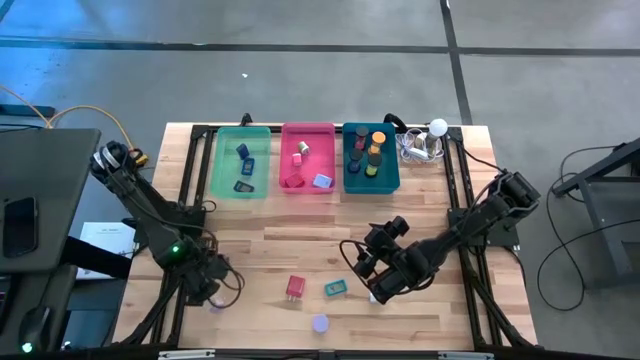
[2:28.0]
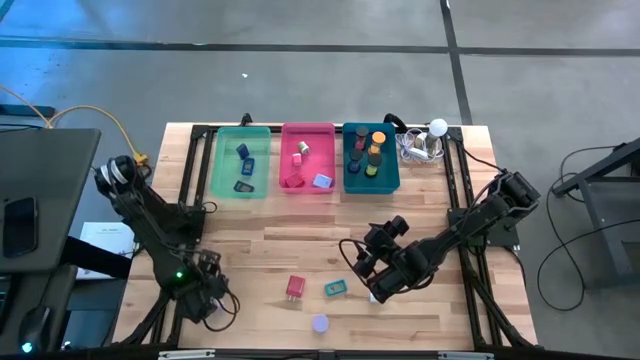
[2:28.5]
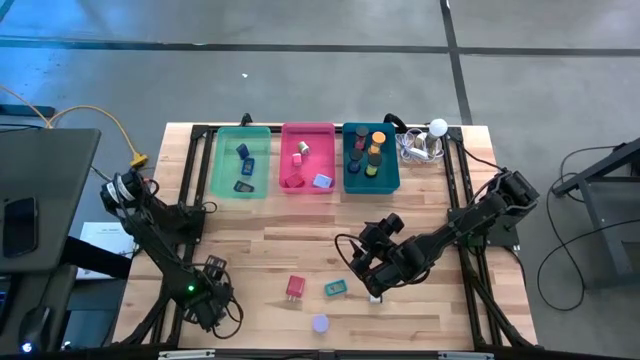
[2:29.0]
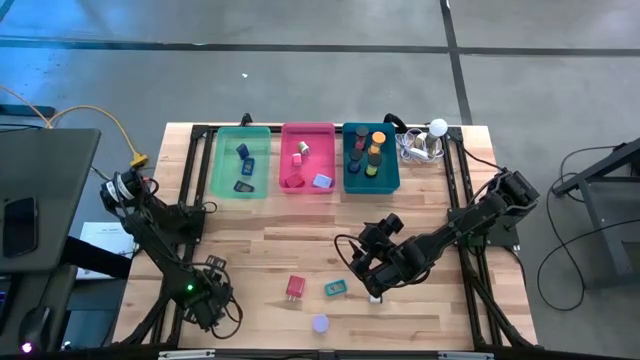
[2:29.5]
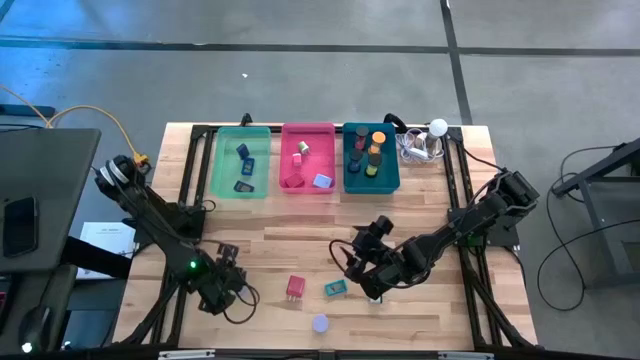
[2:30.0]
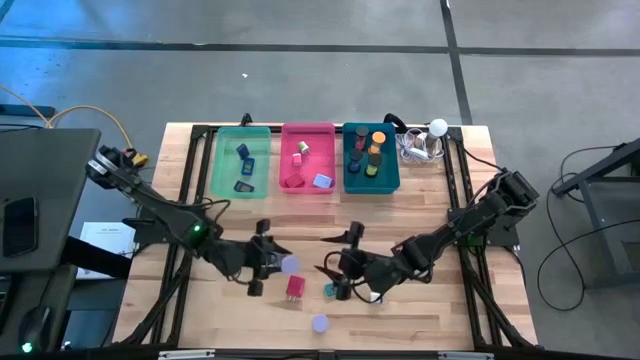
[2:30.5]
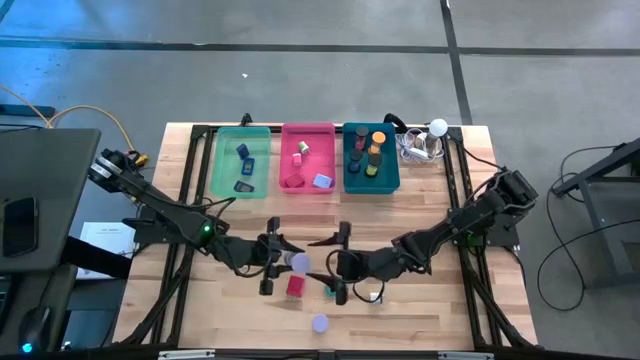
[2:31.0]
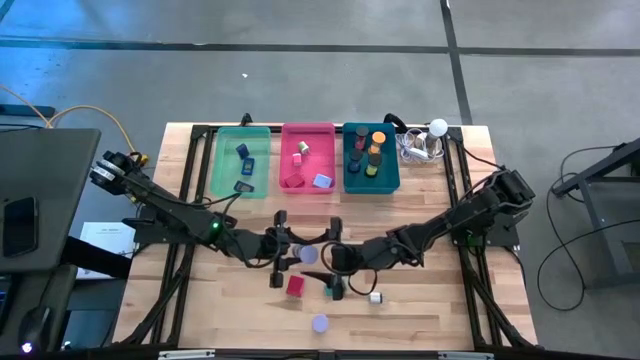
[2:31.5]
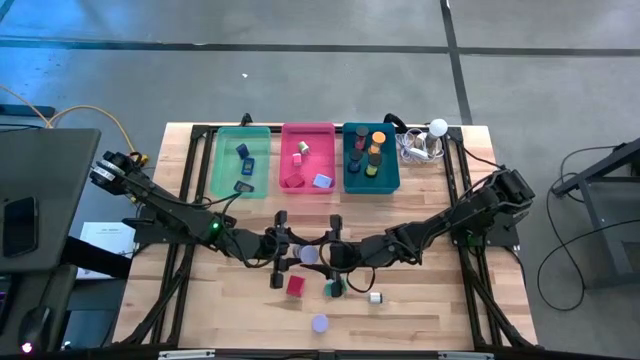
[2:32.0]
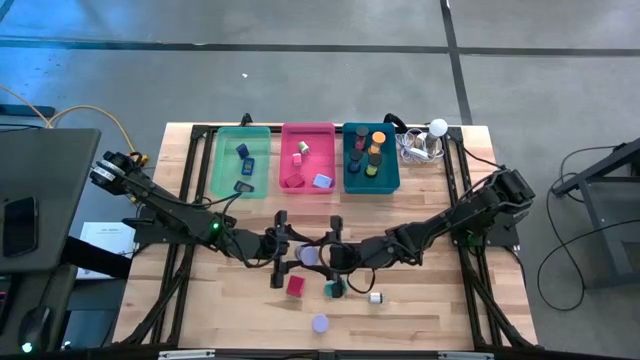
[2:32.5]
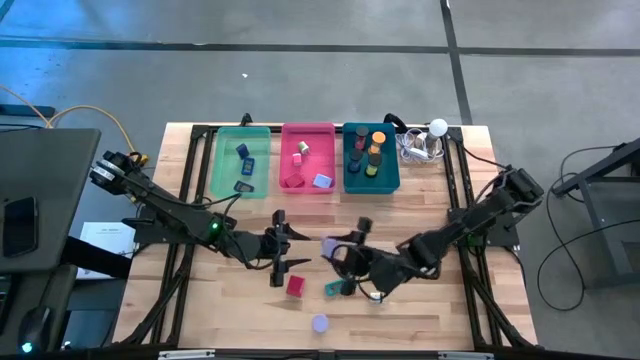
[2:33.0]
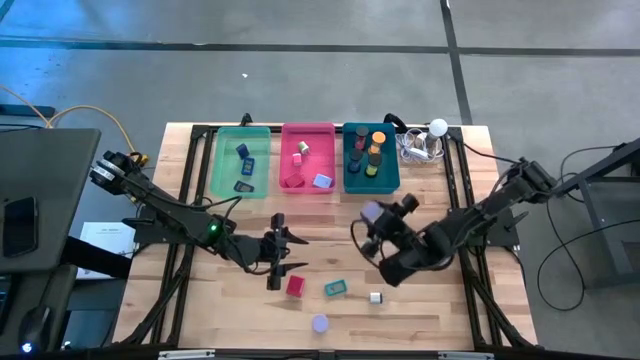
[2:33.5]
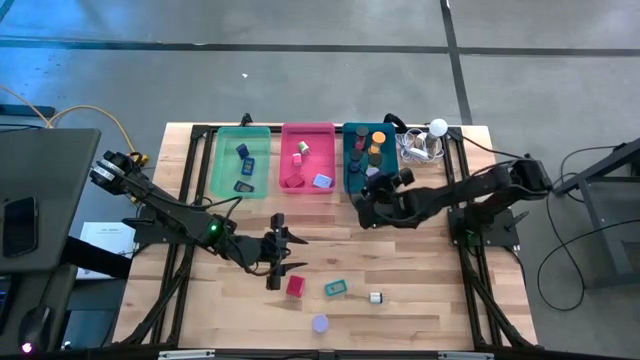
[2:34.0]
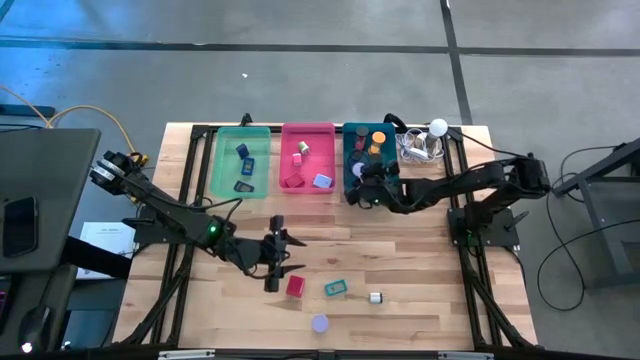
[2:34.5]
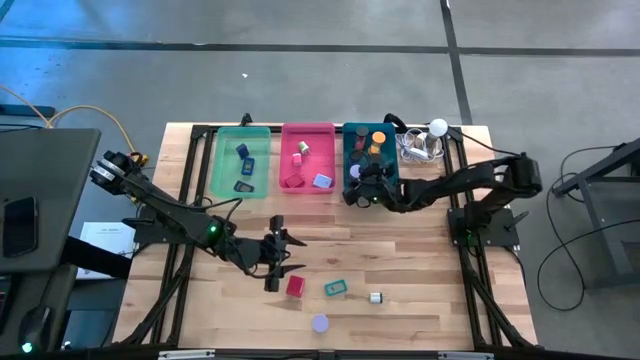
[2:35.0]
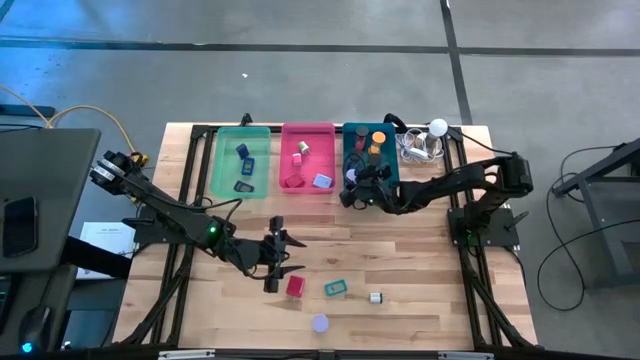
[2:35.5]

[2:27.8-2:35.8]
Task: Pick & Place Office items
Put the top purple hourglass into the blue bin

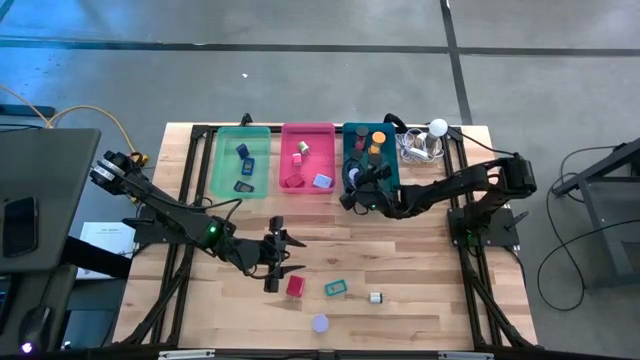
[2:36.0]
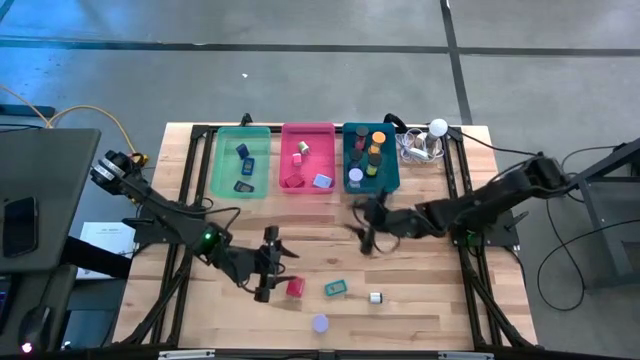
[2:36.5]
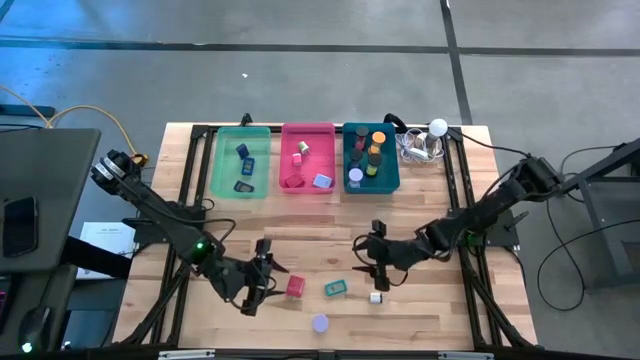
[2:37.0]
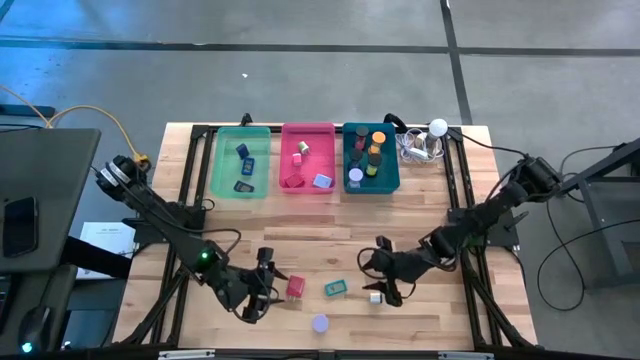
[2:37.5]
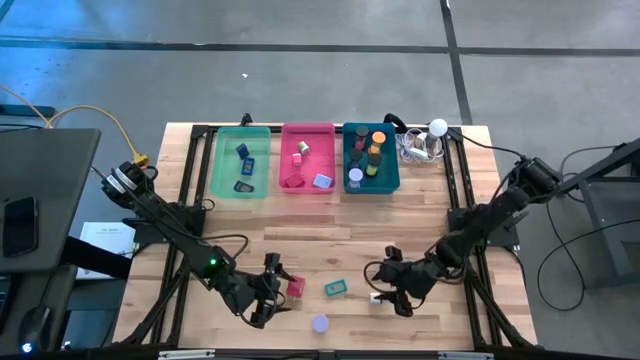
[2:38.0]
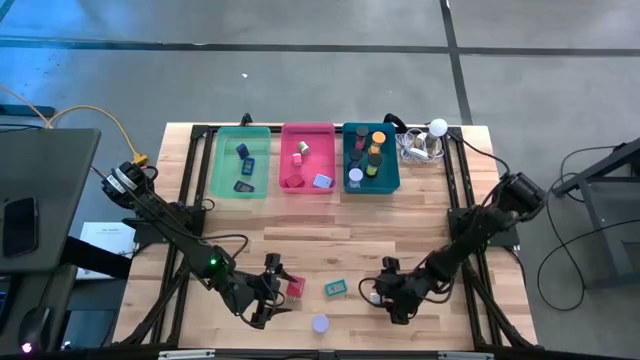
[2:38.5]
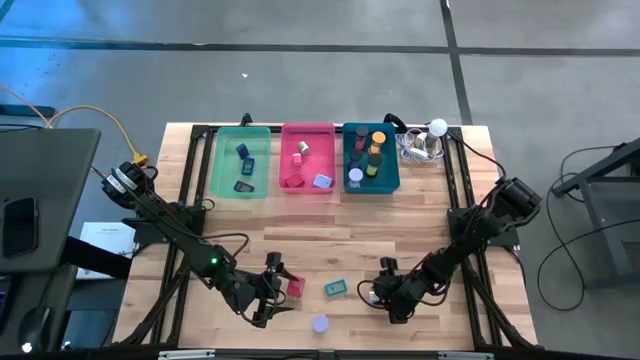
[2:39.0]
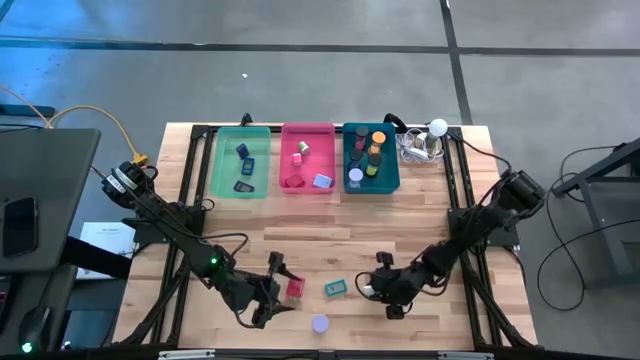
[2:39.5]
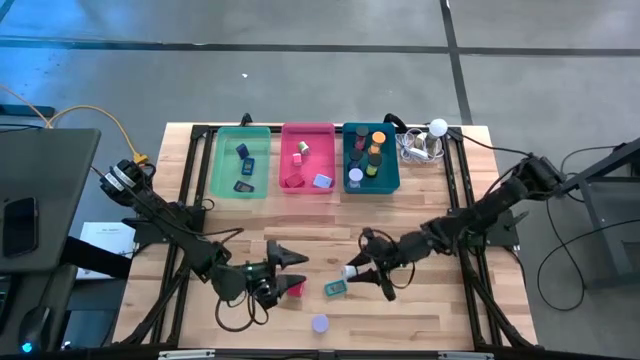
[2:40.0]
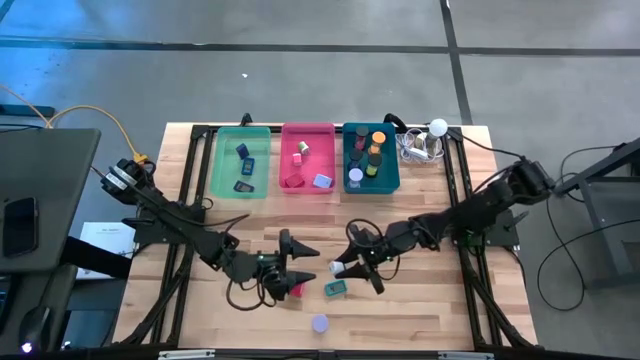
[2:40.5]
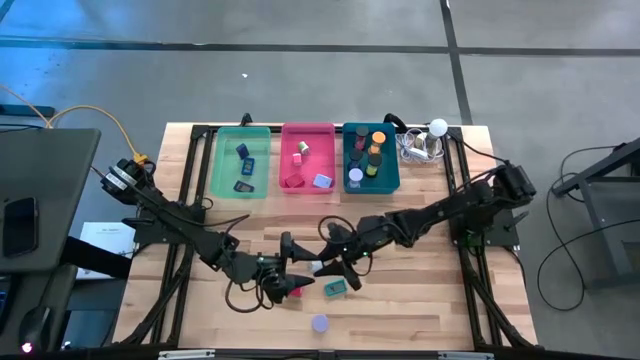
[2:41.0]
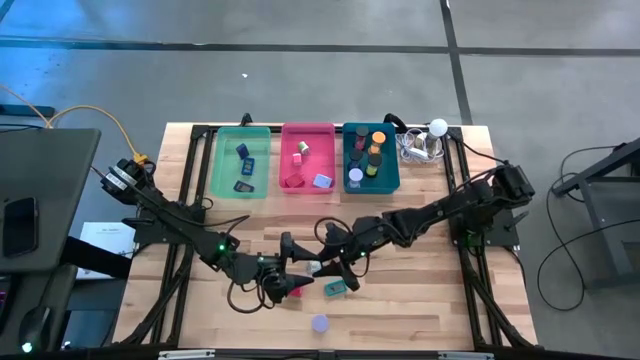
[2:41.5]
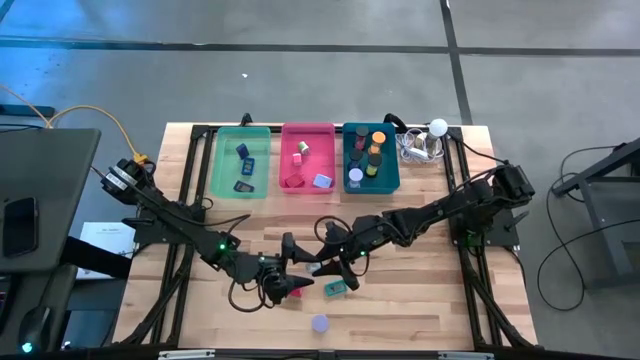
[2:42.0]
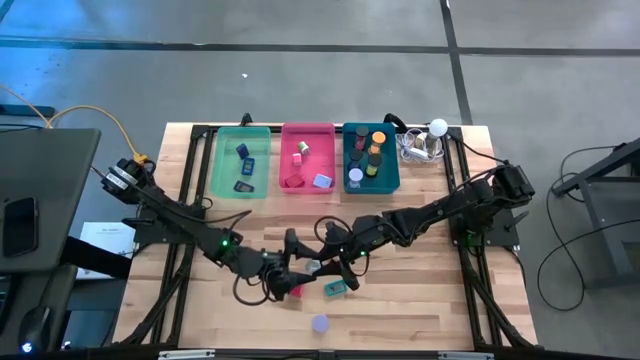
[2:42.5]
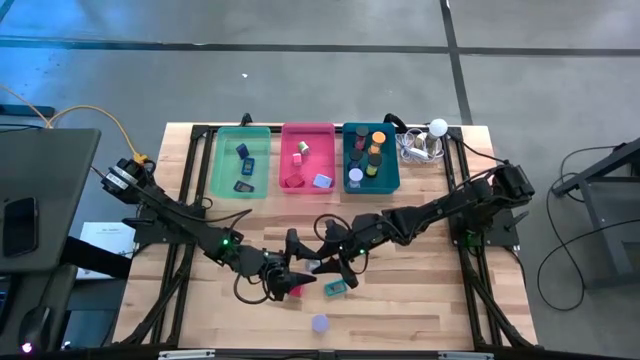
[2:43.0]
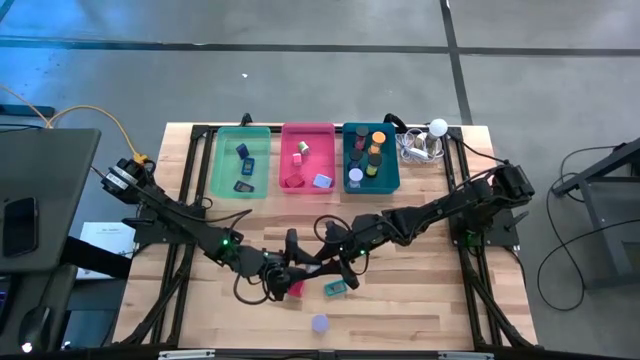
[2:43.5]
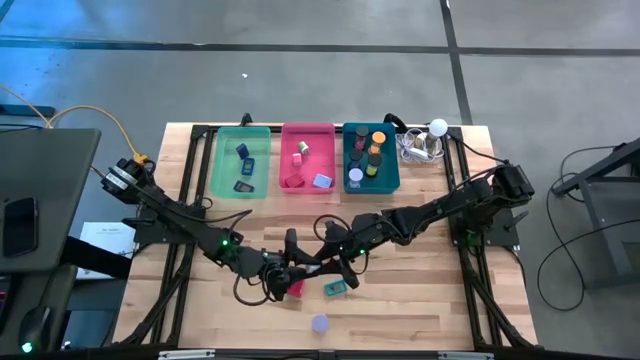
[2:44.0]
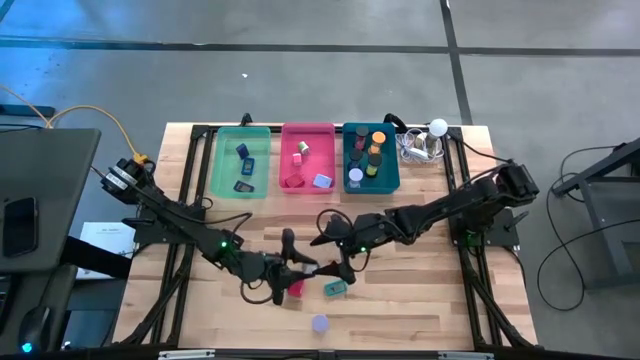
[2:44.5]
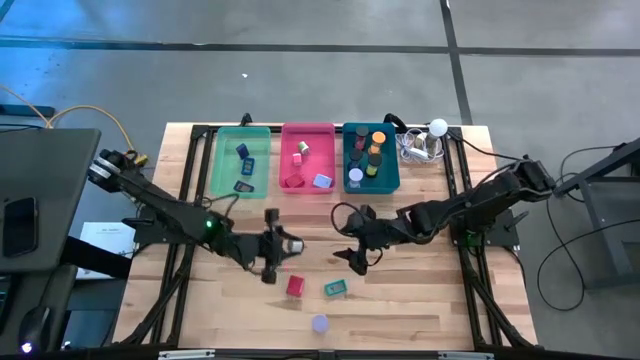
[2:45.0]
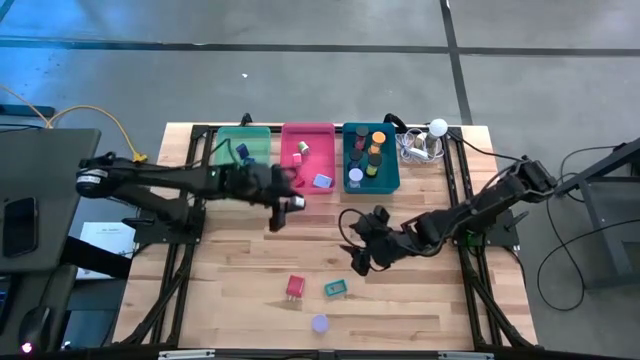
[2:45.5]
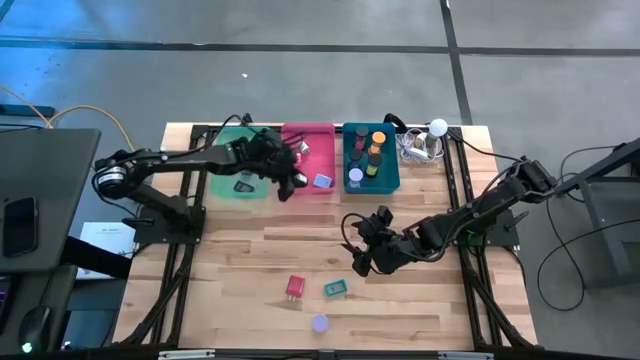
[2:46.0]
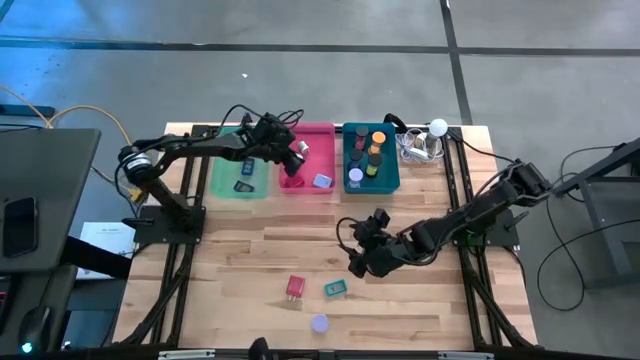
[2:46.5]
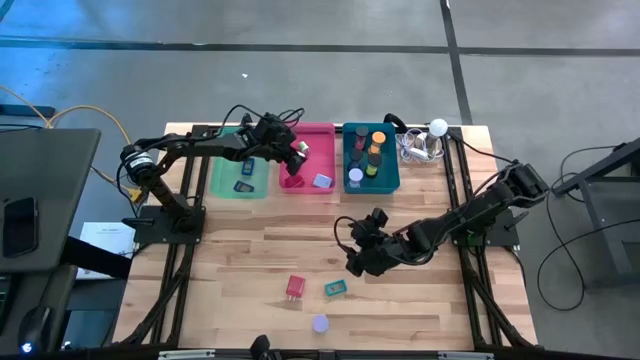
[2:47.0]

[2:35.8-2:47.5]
Put the white charger adapter into the red bin
